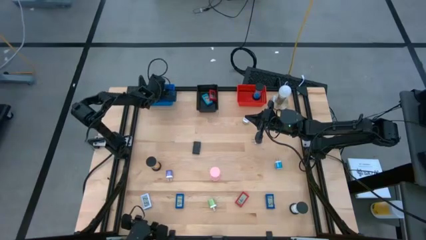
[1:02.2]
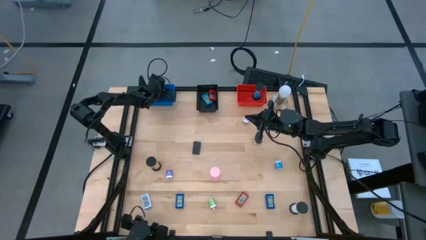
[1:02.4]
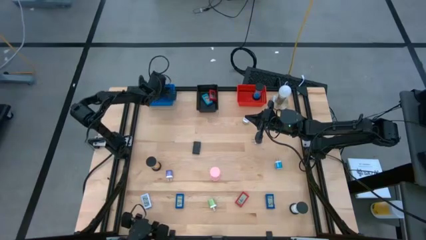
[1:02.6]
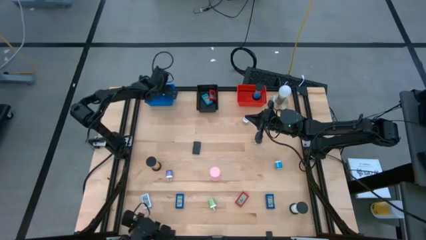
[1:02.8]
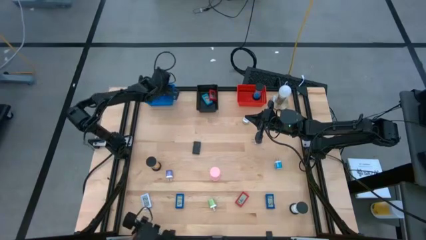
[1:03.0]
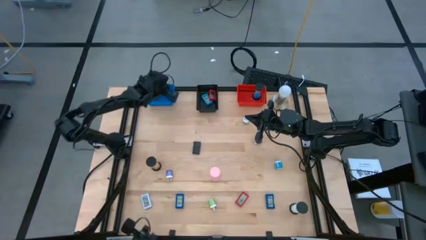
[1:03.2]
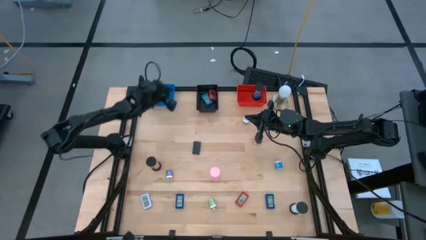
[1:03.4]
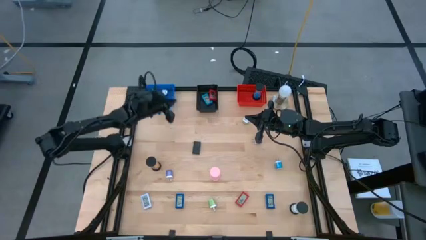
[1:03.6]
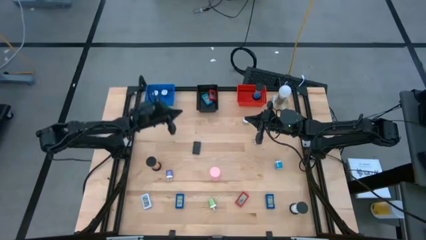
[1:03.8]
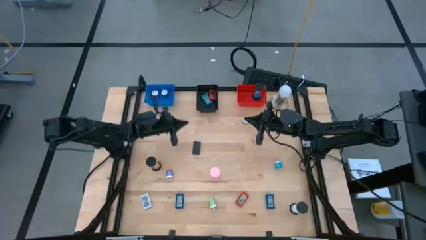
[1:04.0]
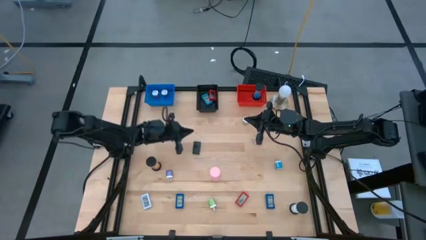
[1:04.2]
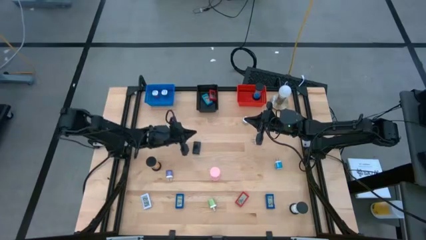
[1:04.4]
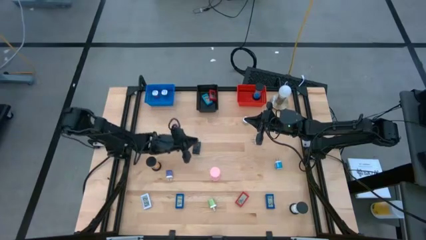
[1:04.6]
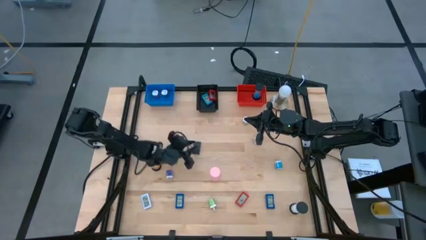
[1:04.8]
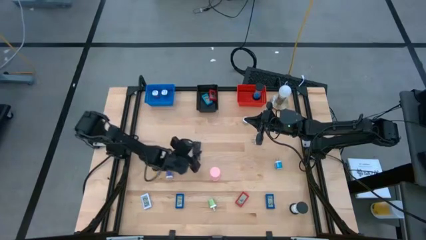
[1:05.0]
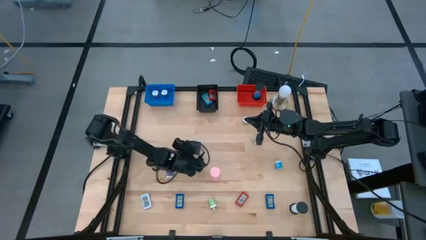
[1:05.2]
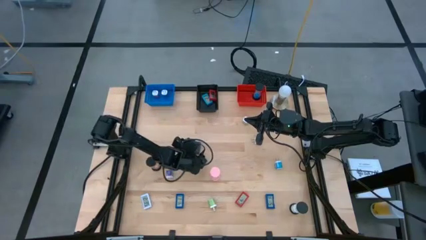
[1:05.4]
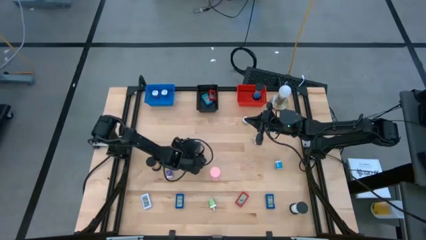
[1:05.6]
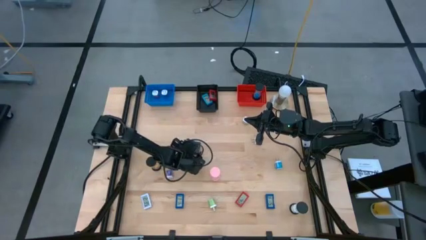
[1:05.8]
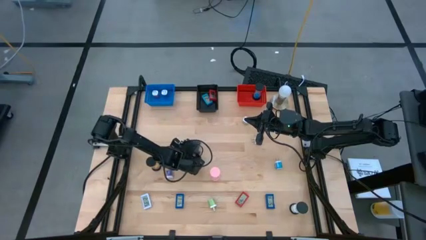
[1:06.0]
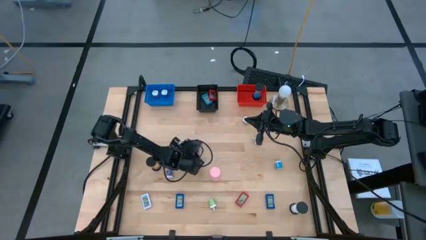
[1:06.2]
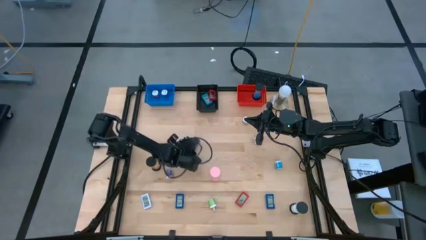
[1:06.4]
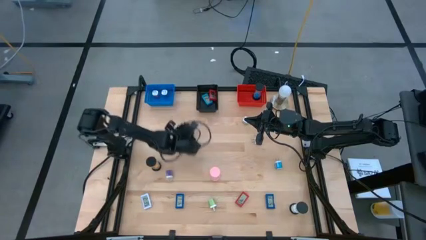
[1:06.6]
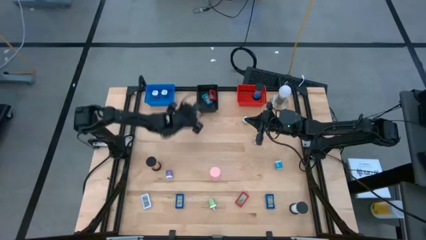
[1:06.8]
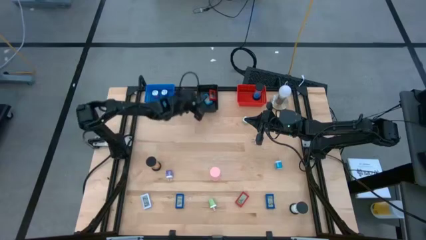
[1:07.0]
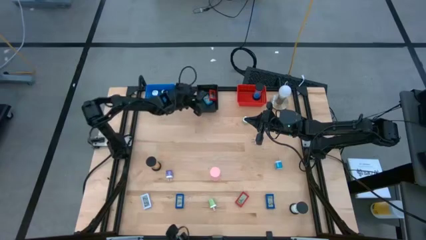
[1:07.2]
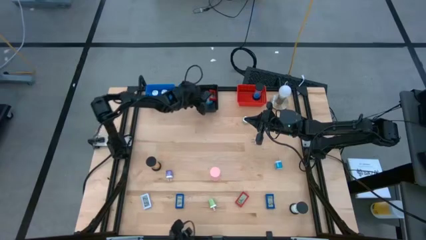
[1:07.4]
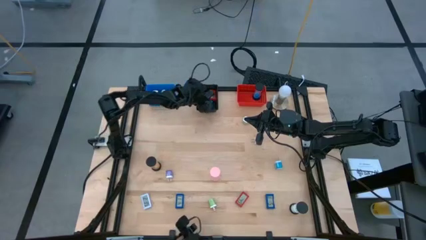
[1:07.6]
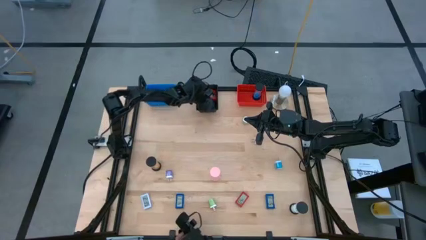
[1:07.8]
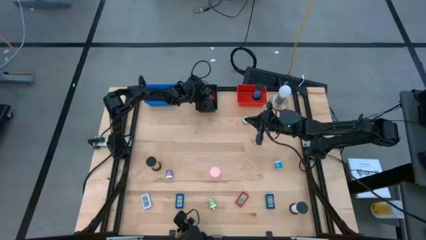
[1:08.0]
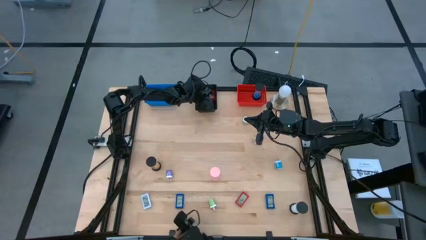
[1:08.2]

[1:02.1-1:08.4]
Task: Pick & Place Office items
Put the black digital clock into the black bin

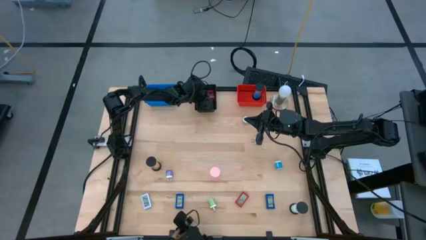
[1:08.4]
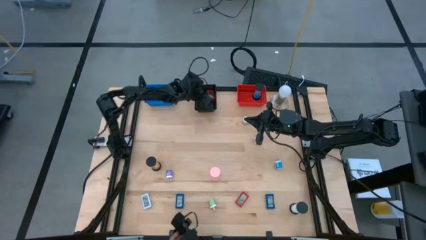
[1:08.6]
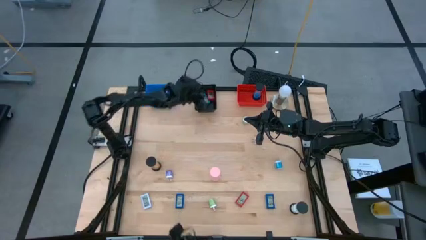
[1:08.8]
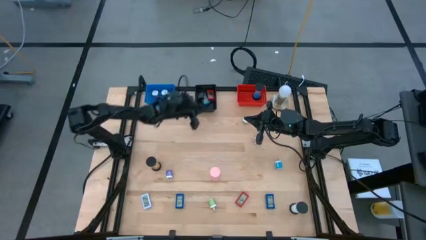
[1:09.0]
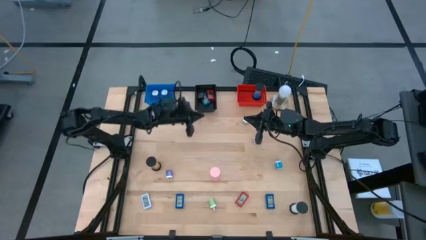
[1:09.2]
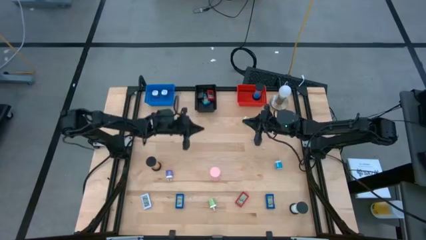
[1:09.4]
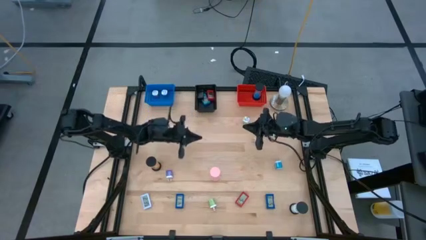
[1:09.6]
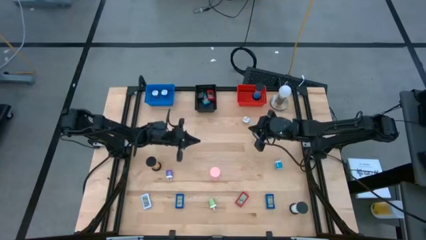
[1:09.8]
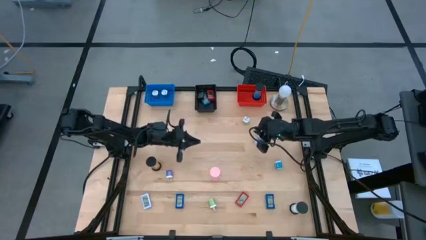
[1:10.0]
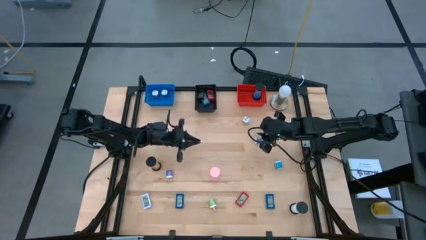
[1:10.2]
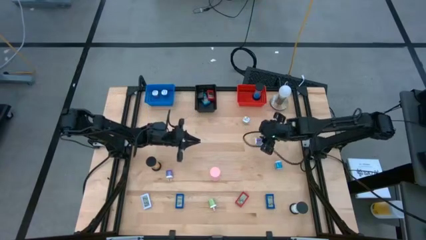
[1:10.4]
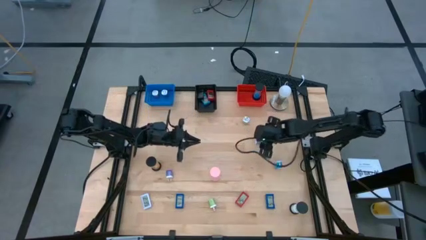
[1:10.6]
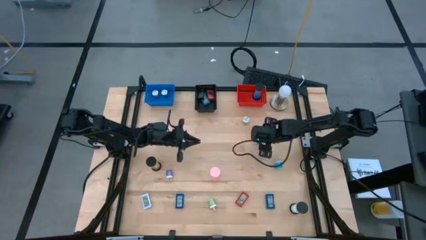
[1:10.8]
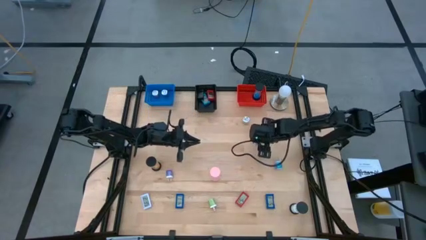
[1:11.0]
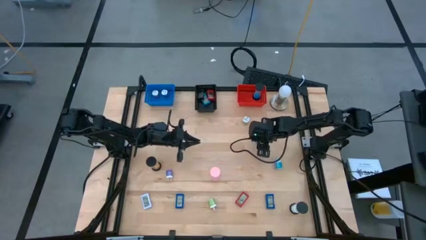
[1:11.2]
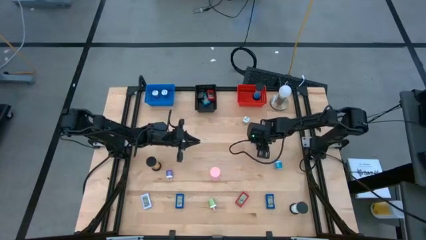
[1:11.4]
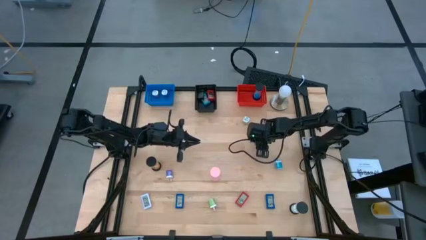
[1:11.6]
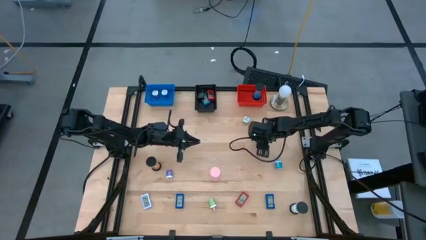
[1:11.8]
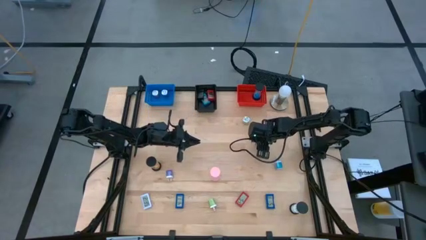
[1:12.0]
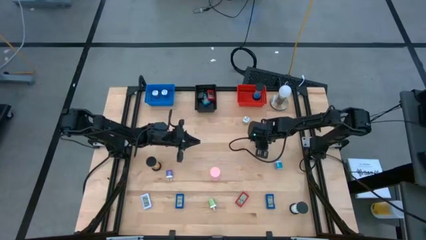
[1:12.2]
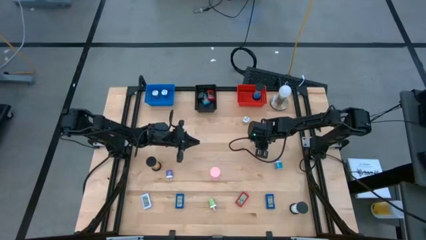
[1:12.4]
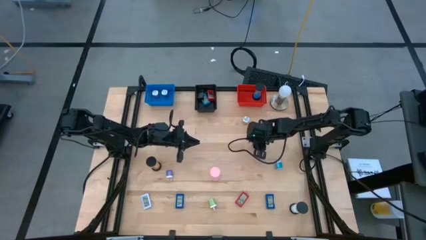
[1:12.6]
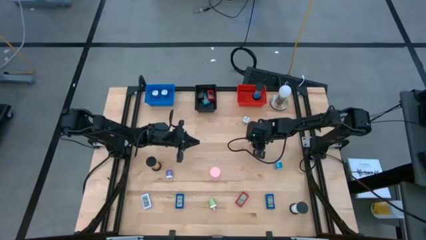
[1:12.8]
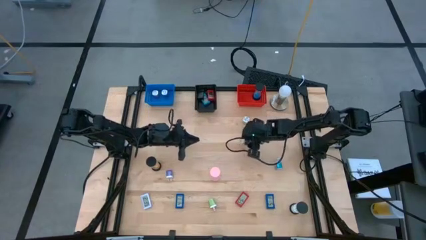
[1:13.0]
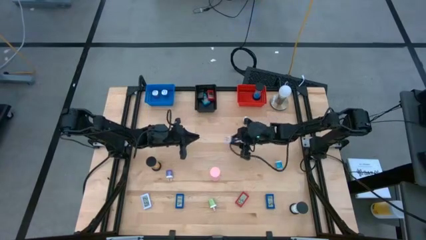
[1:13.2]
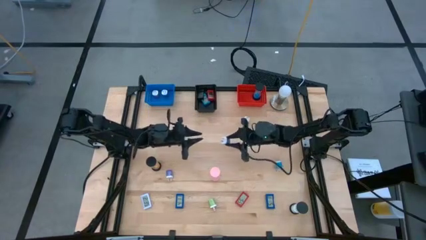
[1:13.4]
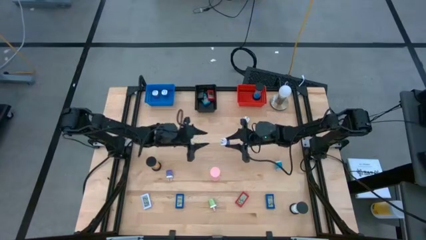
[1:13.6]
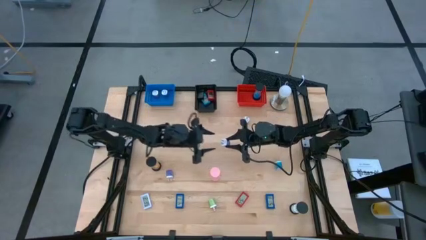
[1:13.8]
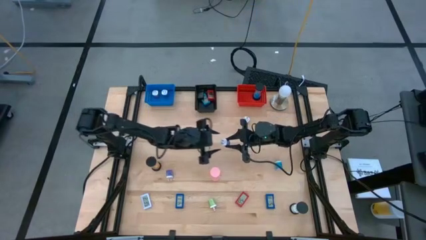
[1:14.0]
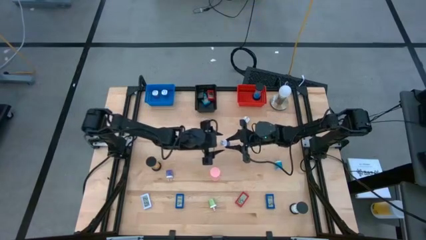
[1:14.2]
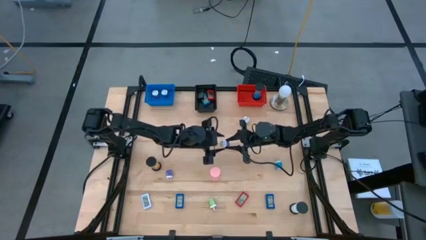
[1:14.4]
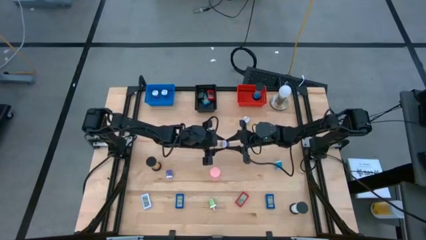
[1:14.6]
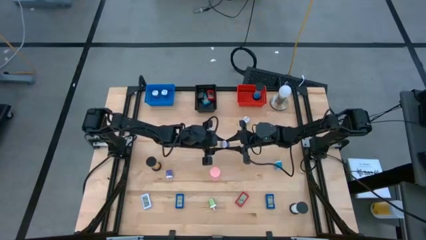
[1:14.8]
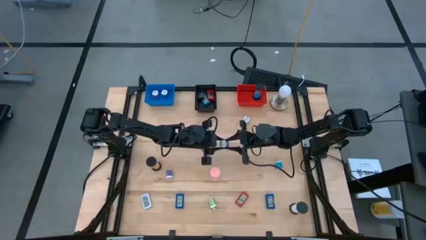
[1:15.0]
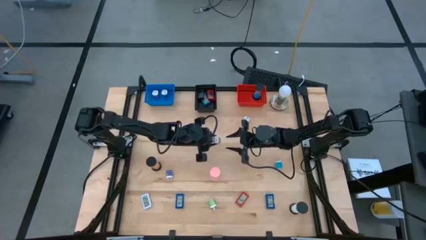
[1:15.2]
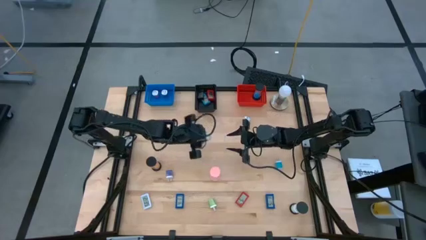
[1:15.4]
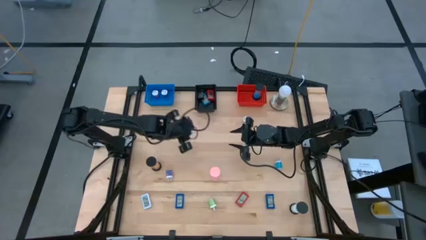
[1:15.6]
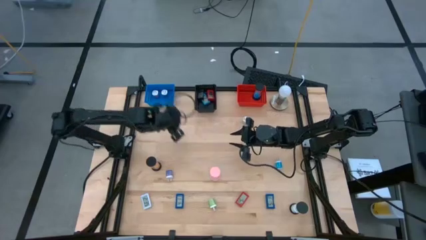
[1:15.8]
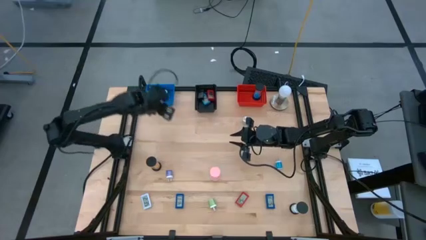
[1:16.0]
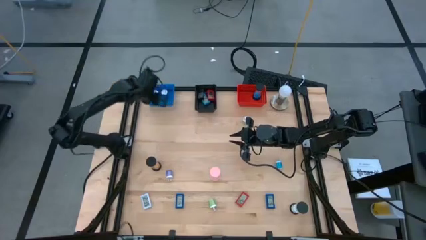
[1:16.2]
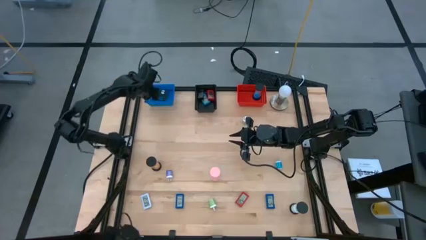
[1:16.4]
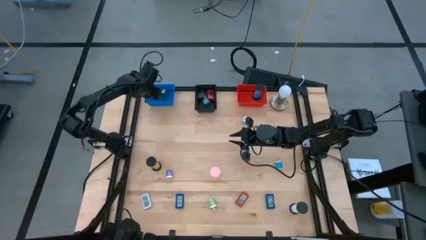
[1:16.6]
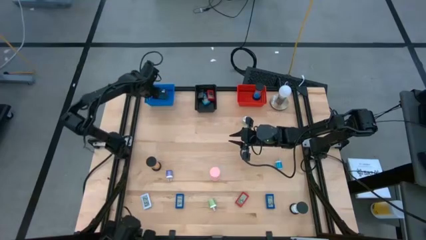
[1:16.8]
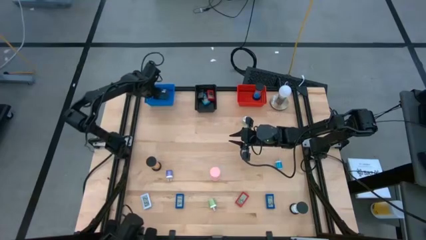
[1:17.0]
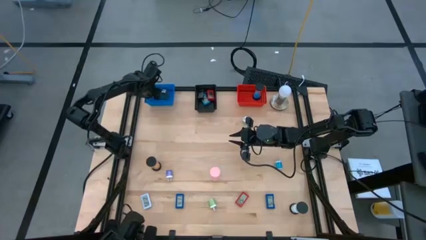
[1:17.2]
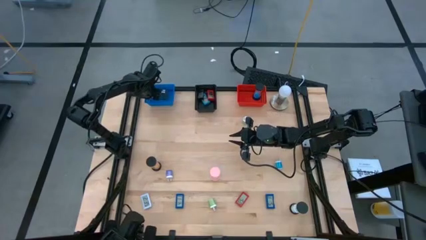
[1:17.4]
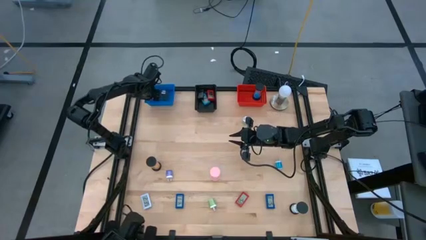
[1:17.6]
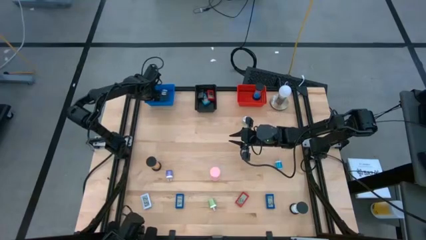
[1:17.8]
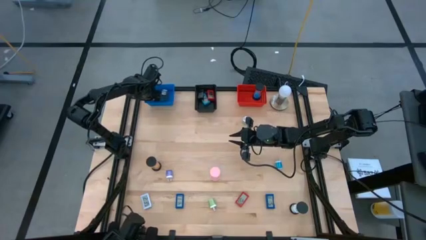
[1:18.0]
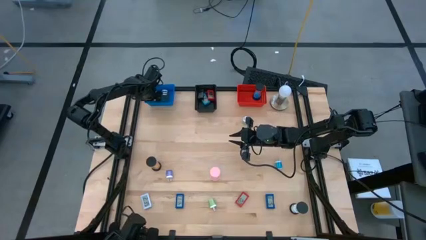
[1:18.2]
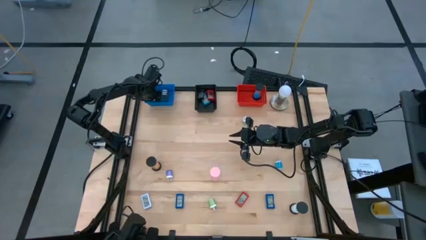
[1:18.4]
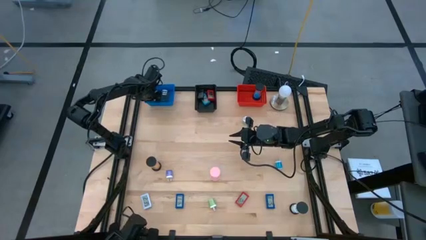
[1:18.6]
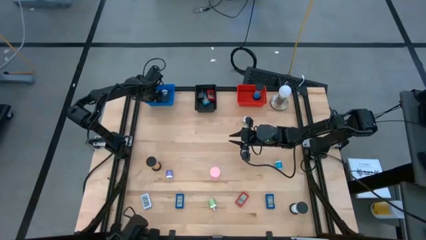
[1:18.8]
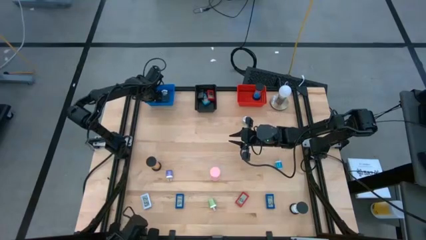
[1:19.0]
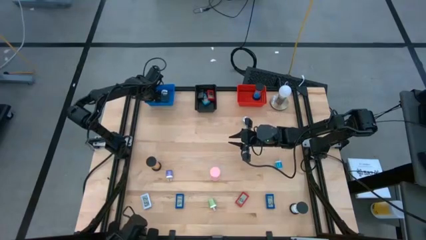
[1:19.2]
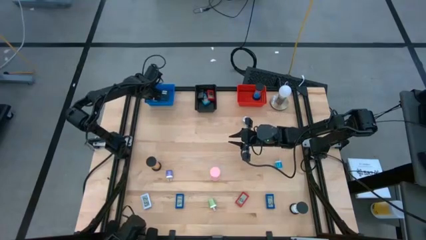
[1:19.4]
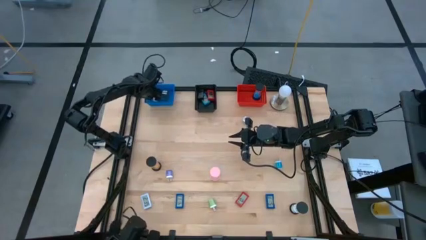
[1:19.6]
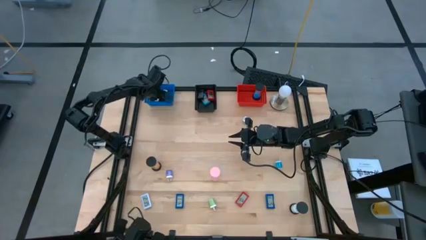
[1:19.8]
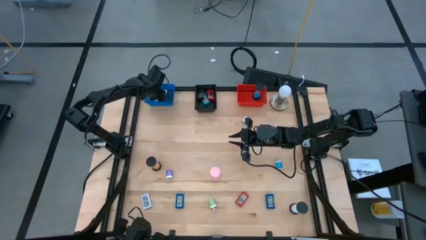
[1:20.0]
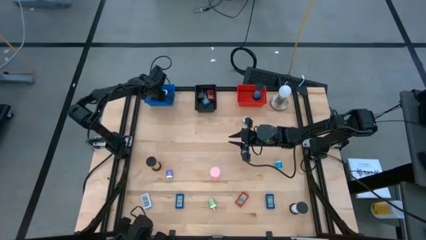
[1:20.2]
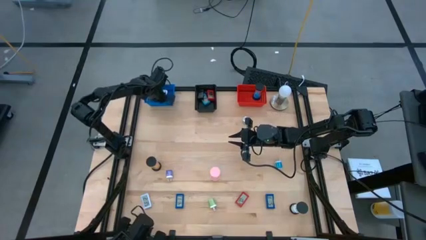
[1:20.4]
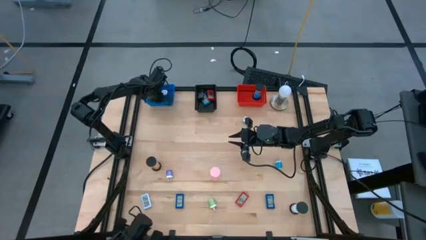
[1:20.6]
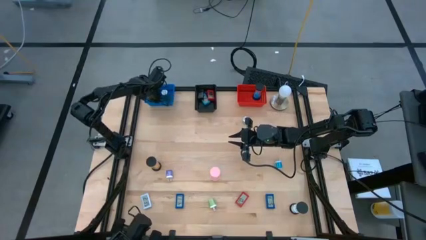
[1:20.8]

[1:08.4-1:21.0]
Put the top purple charger adapter into the blue bin
